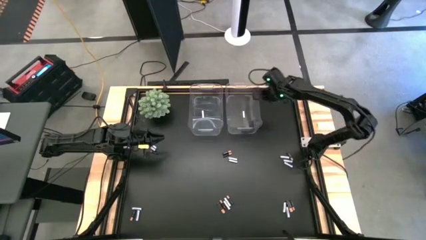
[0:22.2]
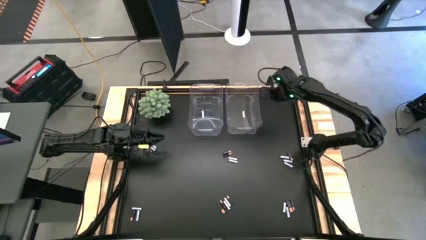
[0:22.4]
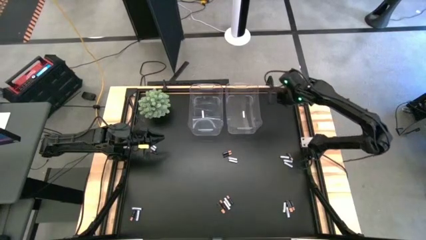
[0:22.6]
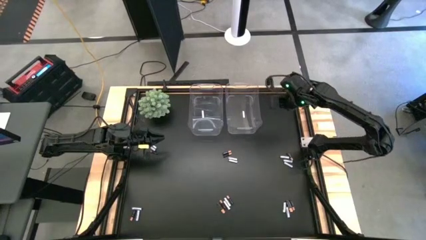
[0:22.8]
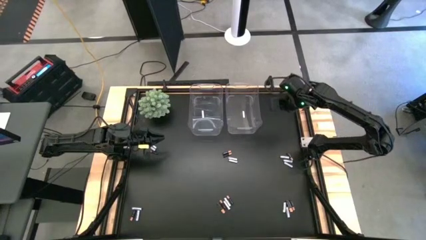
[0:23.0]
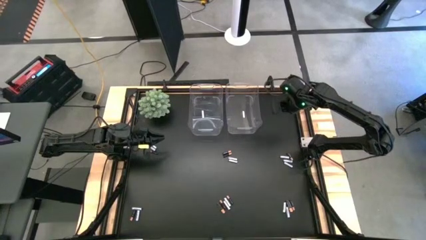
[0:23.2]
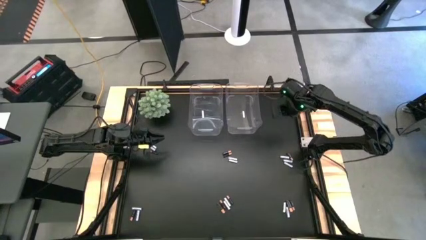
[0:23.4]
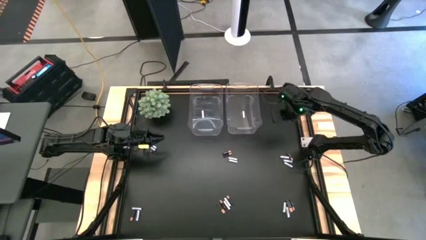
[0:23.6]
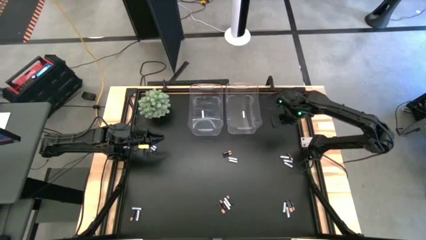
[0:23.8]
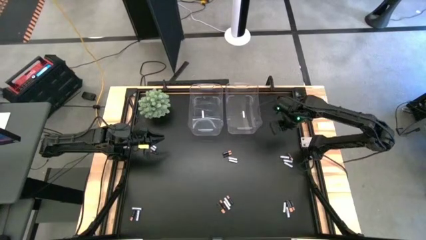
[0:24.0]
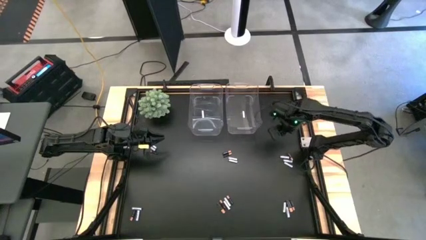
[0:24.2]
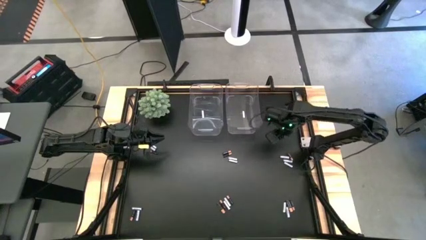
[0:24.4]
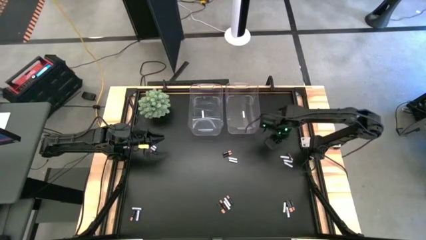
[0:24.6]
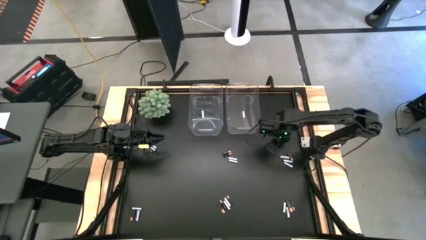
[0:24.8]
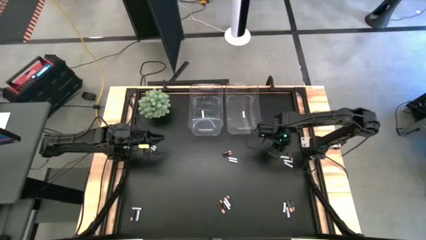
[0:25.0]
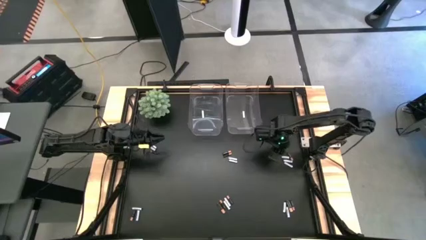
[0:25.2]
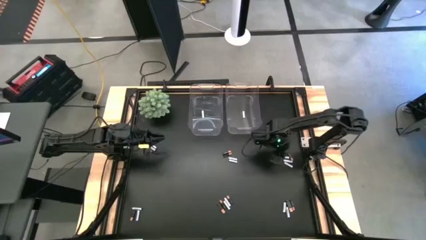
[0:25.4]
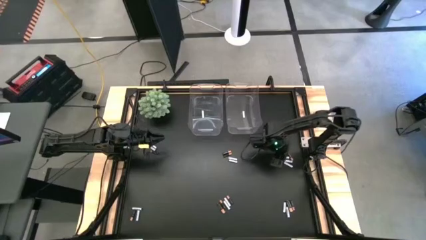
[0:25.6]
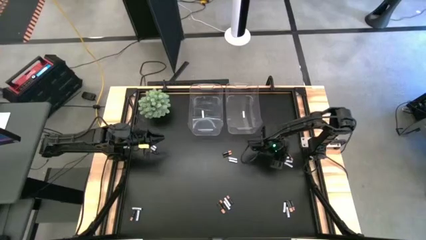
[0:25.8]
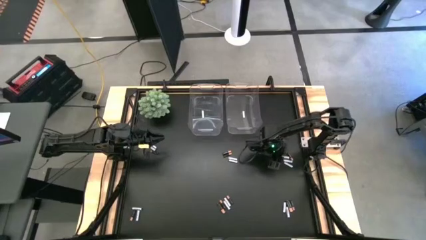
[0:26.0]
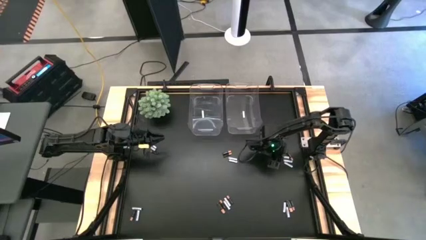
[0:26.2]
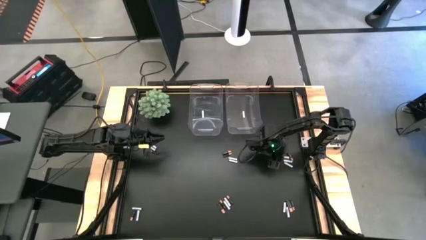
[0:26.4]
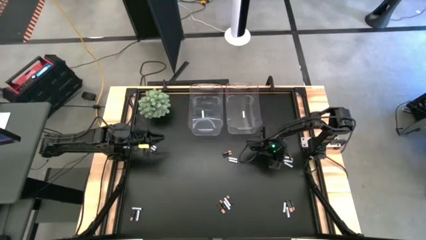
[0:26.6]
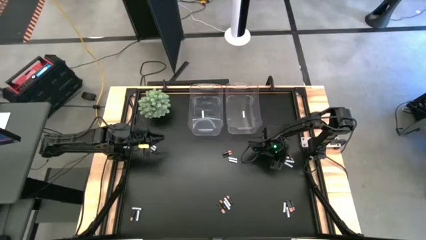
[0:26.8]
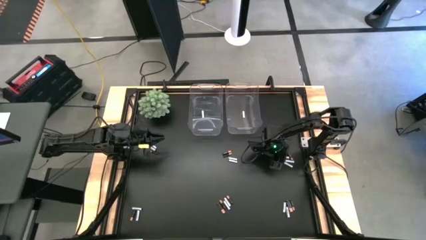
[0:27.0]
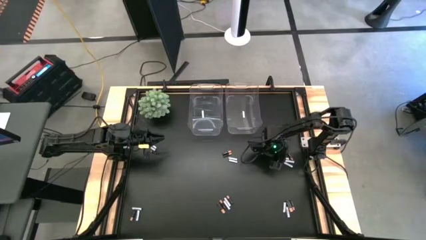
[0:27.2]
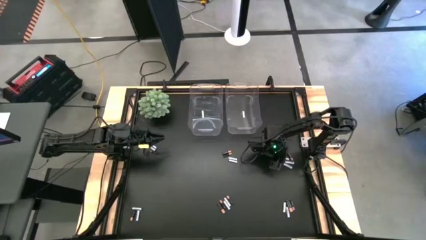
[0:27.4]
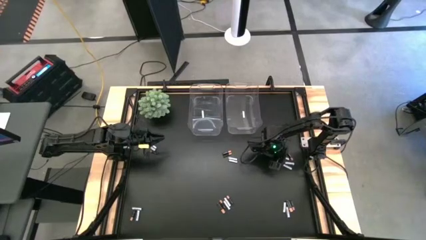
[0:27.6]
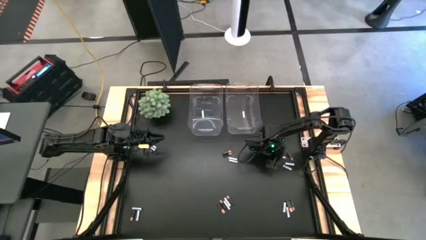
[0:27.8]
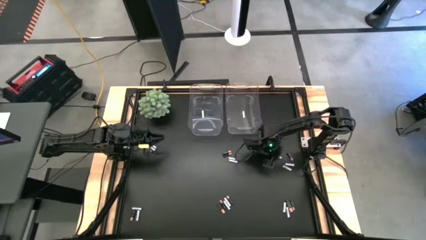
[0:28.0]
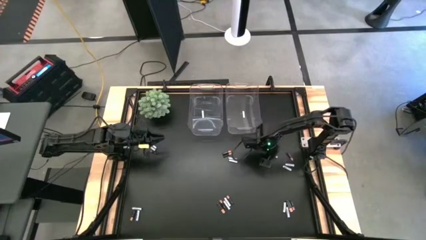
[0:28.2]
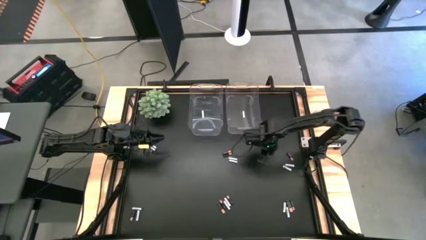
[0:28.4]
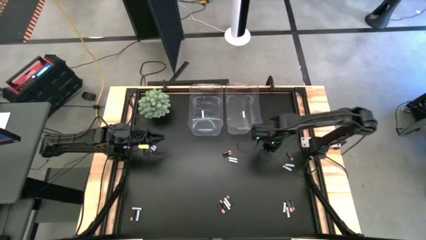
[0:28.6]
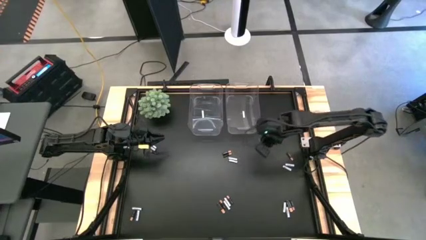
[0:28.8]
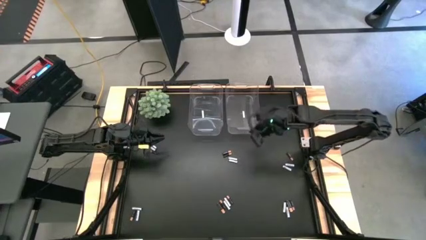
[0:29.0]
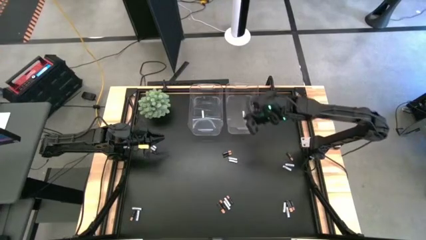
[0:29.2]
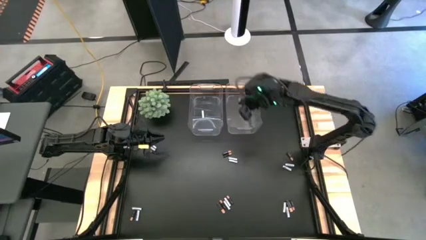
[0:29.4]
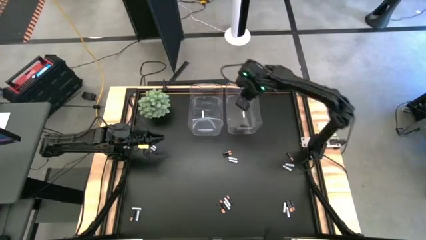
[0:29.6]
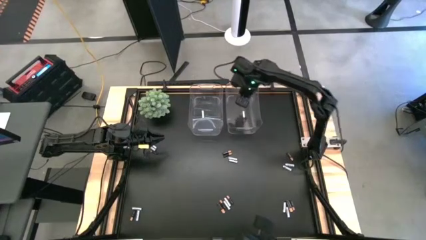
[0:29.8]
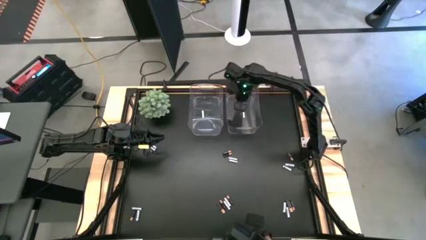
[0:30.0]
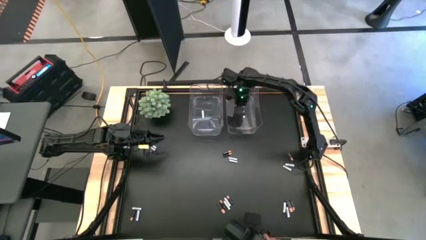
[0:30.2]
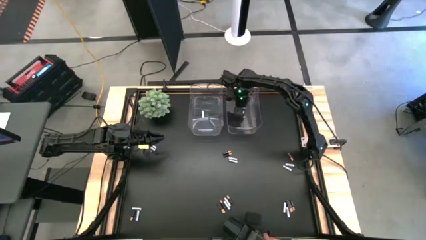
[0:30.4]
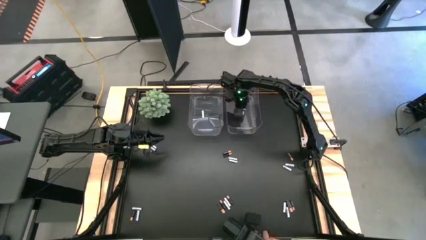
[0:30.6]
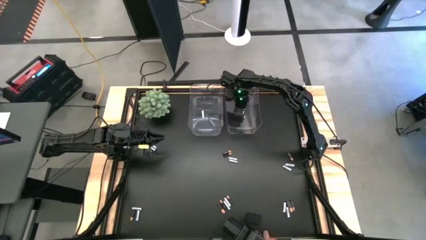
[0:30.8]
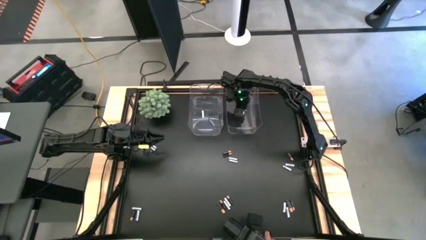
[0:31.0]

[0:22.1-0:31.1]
Task: Sort batteries
Put the white battery into the right transparent bin

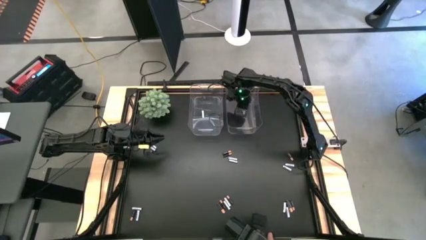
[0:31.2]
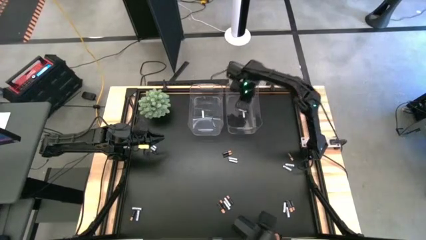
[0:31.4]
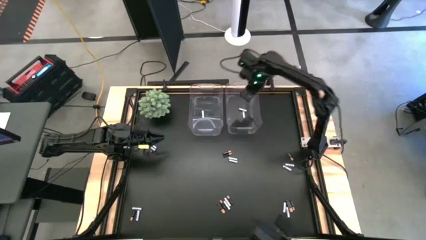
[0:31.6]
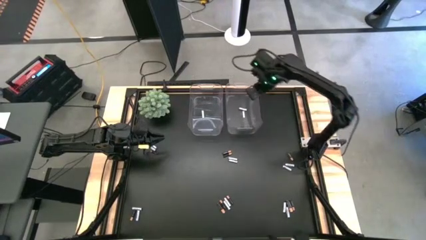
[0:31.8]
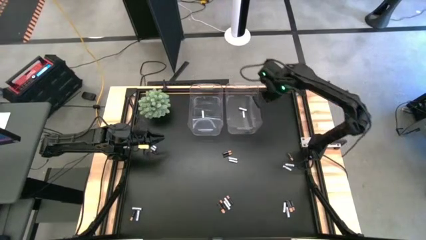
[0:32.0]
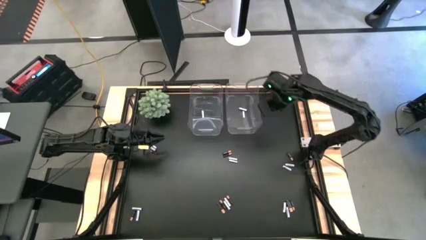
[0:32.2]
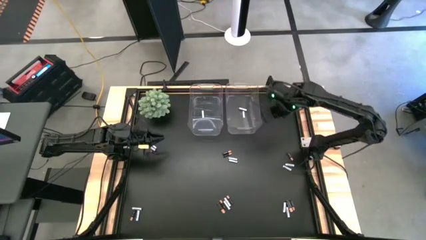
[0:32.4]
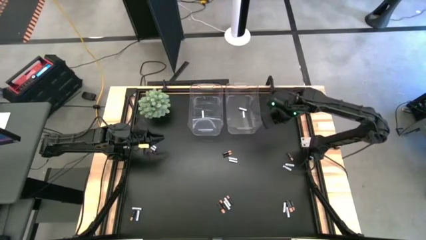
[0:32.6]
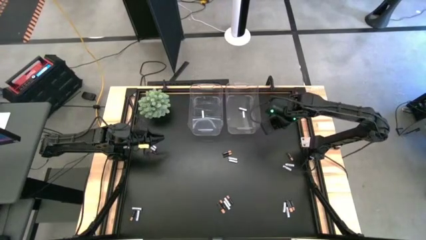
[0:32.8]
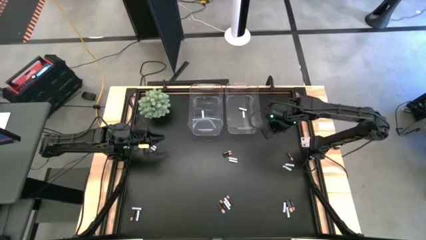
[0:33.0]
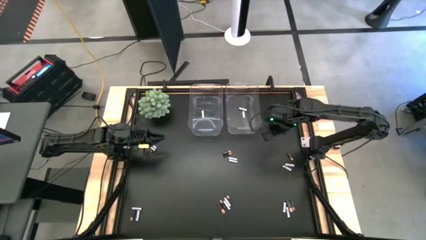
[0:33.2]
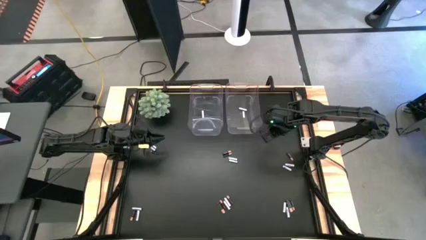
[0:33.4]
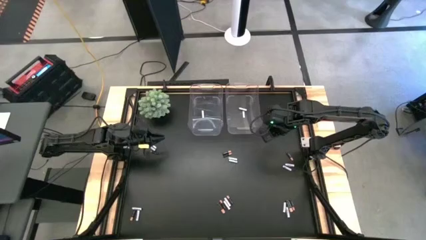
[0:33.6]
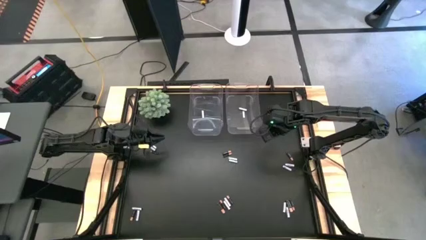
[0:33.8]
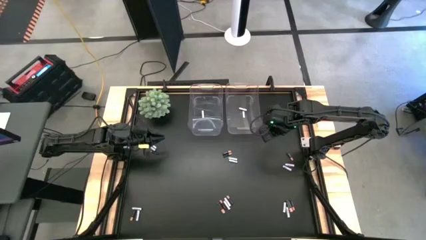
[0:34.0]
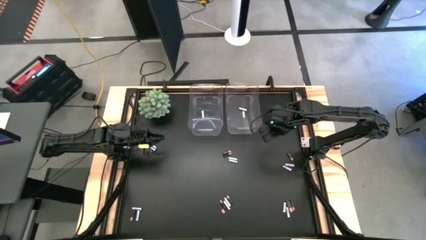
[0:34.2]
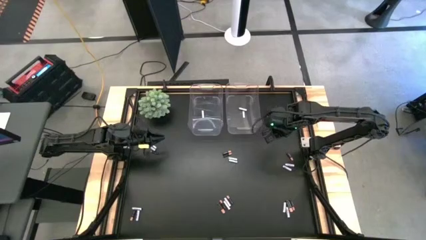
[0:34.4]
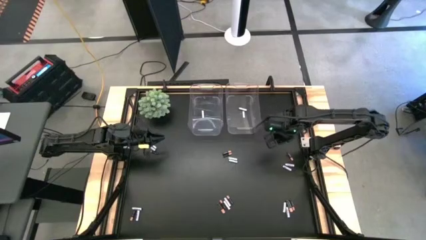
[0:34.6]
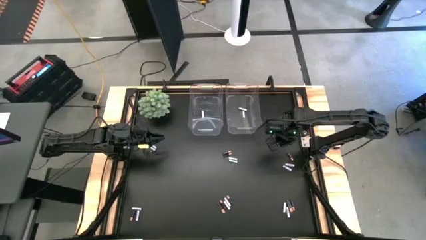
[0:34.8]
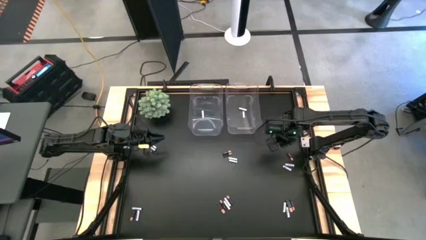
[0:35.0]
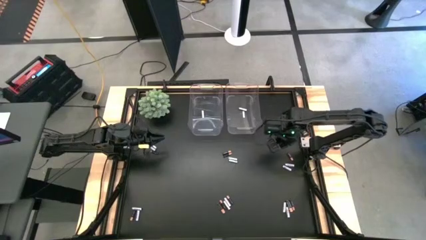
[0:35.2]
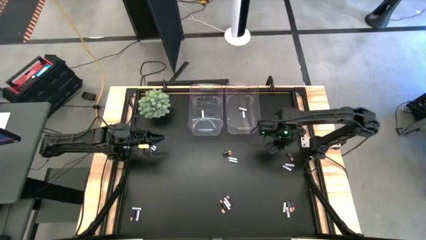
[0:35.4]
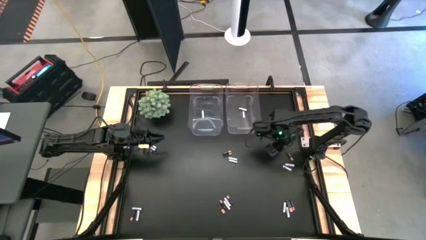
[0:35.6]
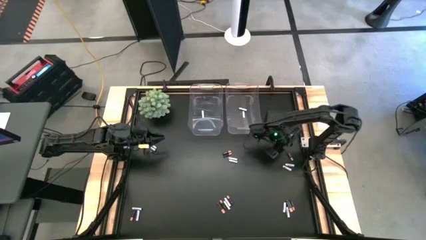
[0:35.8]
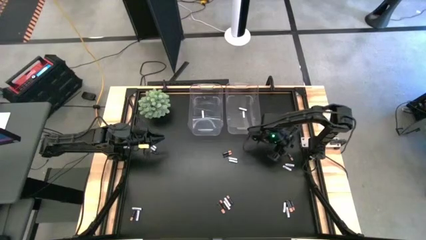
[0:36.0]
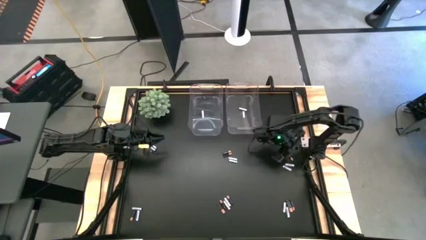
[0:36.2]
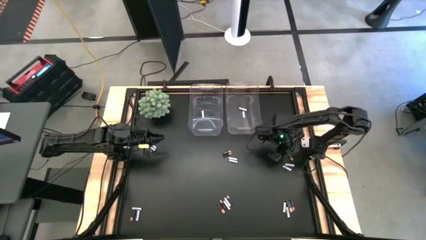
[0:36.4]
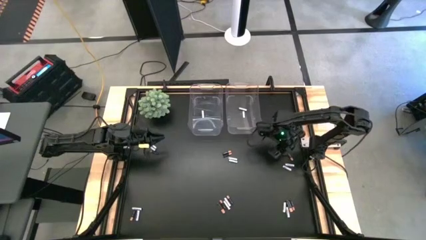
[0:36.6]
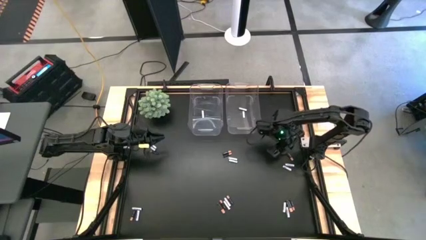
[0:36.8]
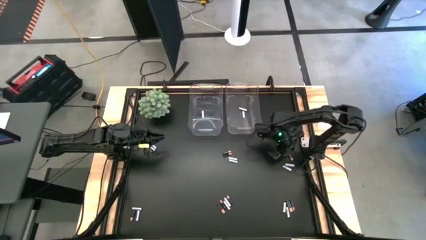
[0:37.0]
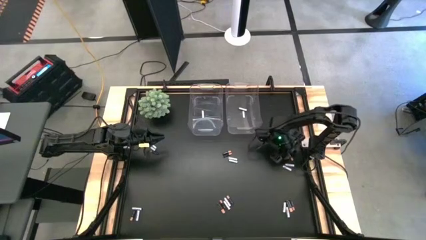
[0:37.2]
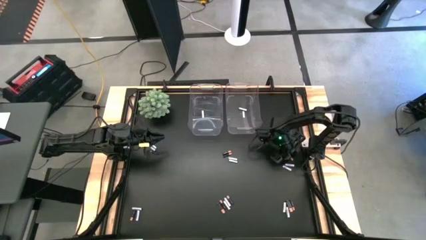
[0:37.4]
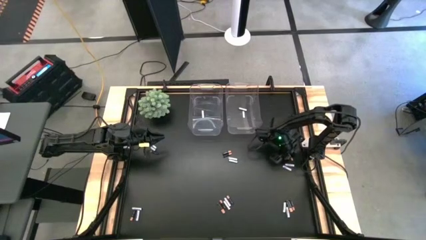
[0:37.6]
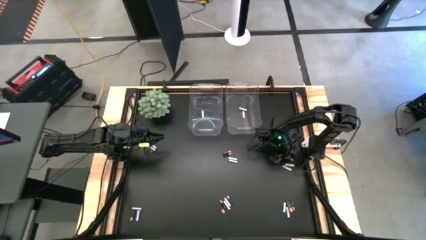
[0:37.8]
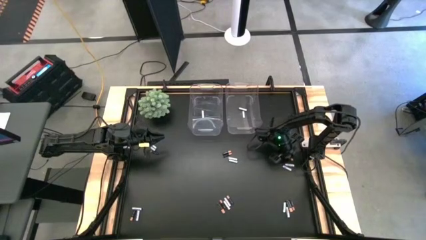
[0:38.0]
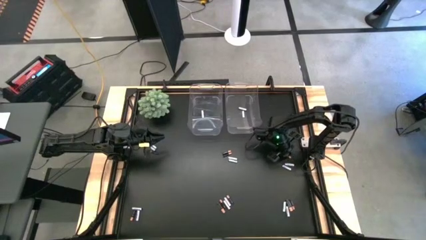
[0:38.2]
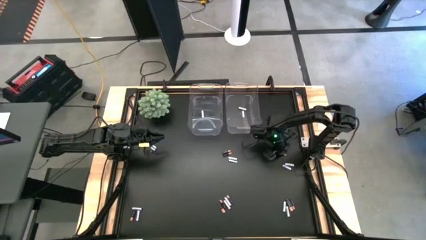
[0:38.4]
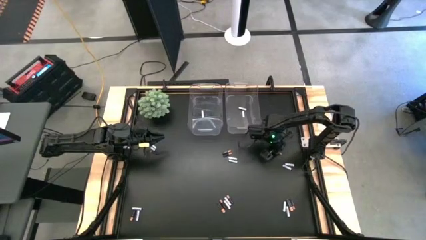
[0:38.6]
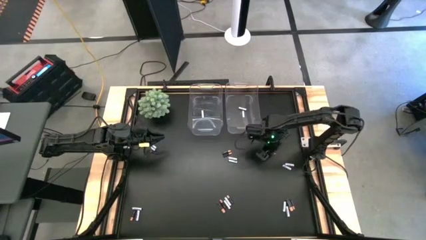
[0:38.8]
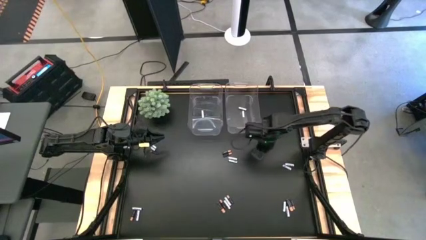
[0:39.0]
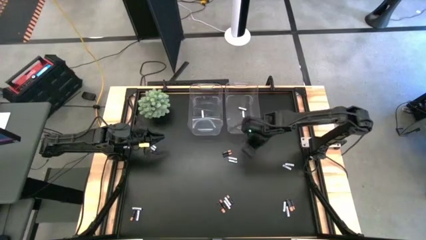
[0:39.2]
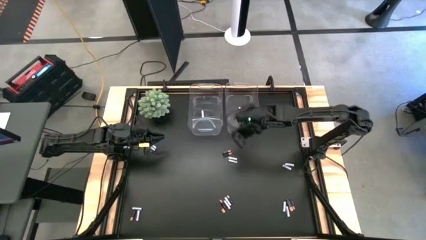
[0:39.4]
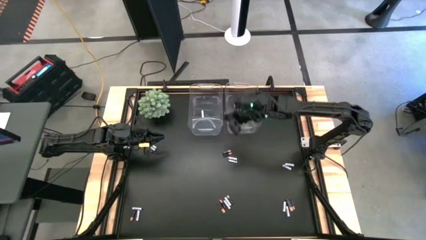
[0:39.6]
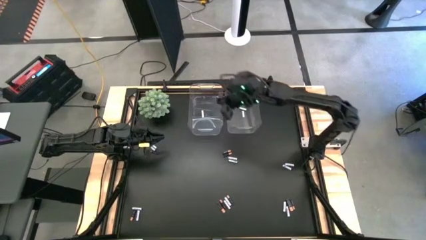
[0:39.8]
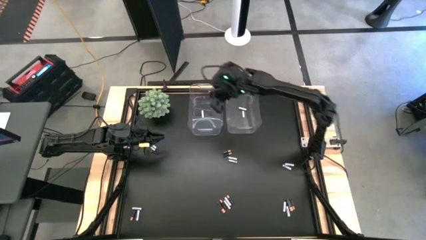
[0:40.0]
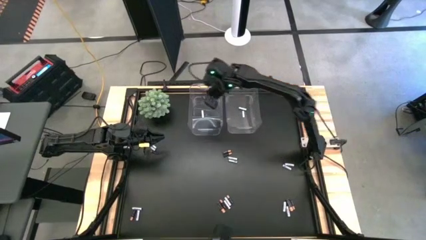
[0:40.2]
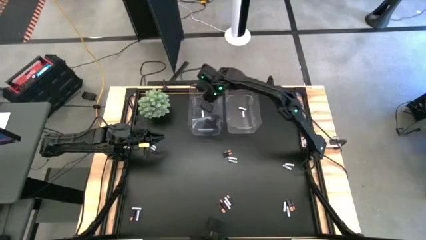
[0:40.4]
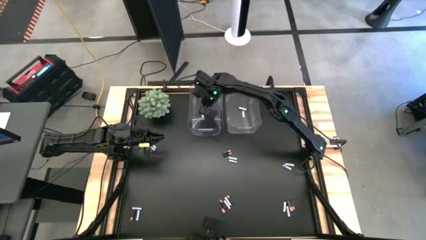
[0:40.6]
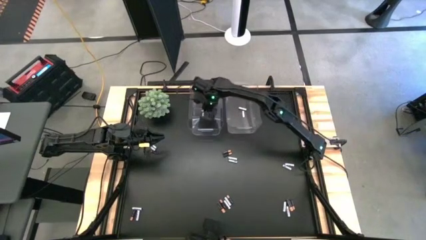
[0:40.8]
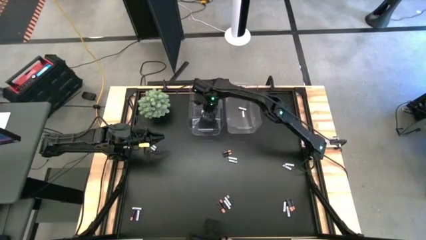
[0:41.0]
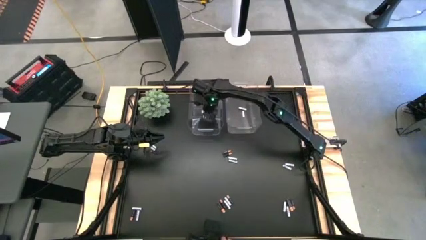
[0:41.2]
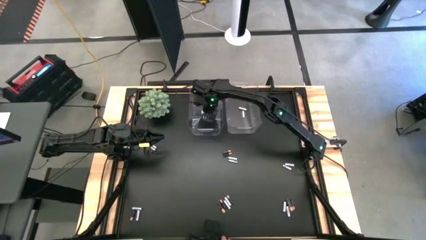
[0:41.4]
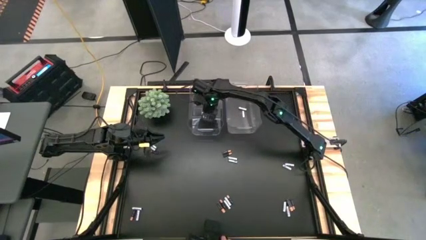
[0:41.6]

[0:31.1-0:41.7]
Put the small black battery into the left transparent bin
